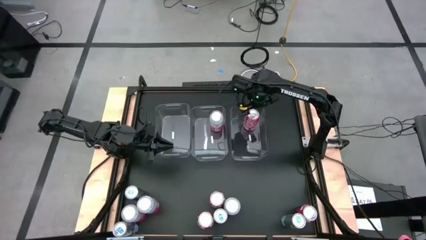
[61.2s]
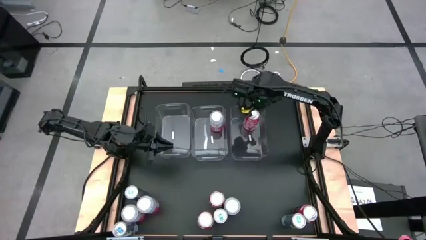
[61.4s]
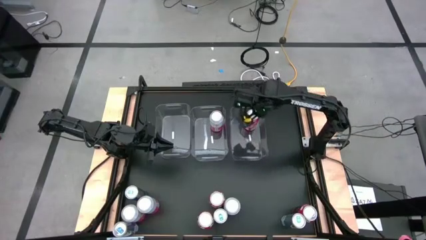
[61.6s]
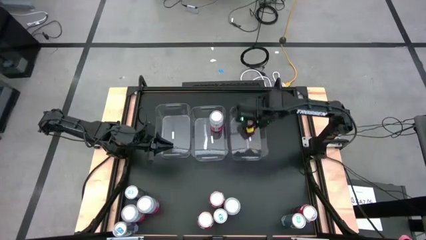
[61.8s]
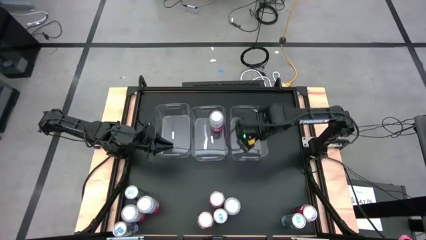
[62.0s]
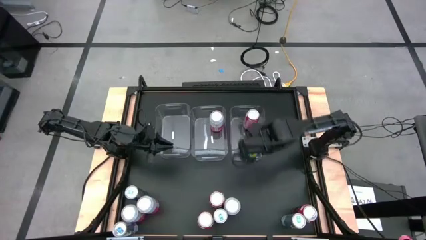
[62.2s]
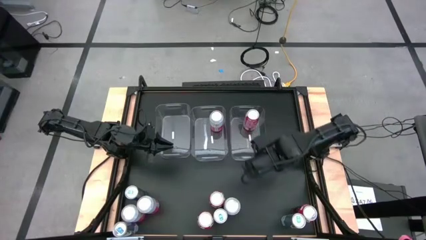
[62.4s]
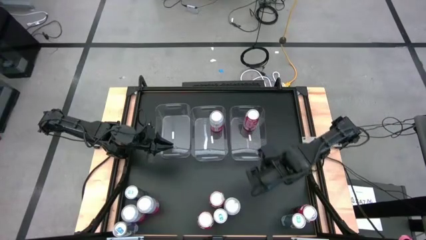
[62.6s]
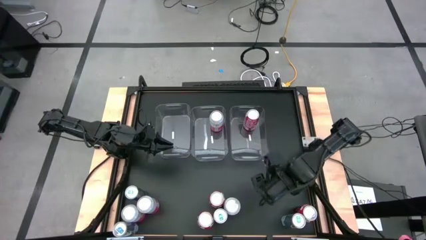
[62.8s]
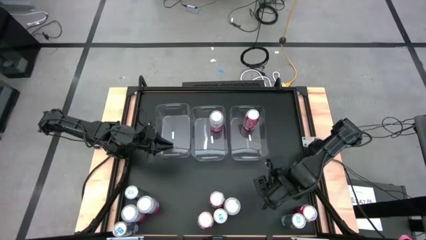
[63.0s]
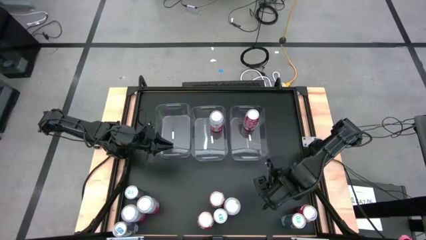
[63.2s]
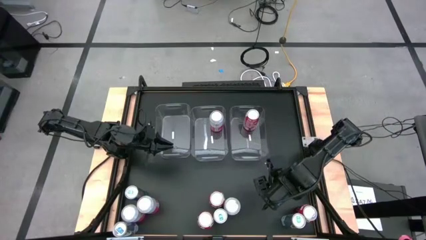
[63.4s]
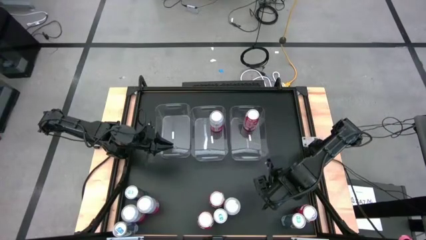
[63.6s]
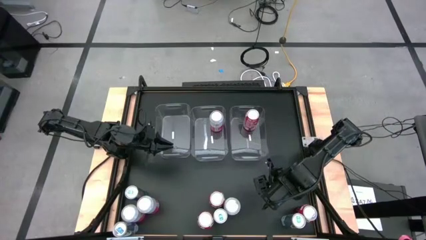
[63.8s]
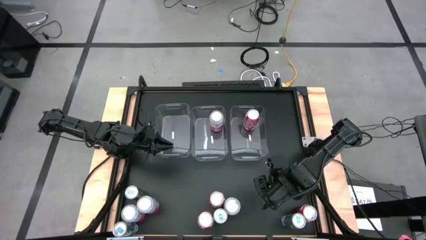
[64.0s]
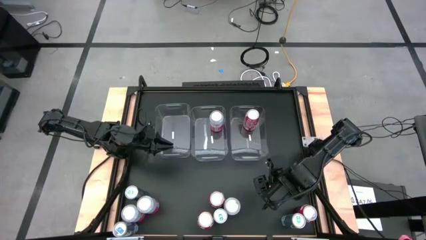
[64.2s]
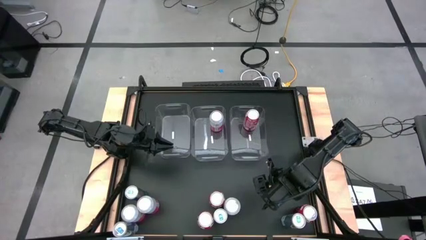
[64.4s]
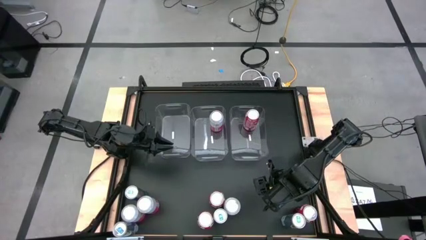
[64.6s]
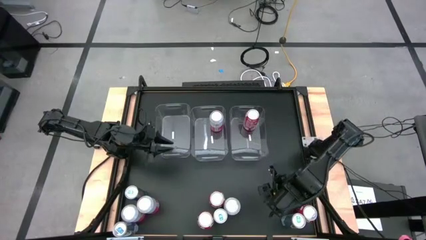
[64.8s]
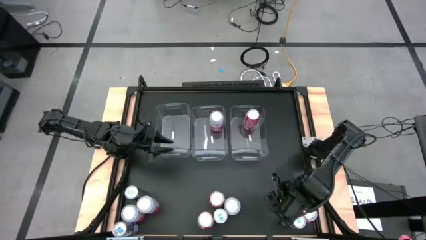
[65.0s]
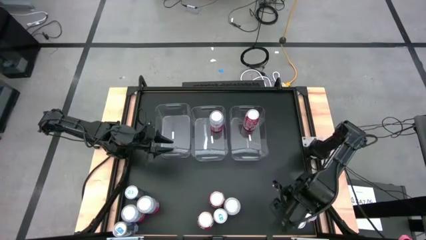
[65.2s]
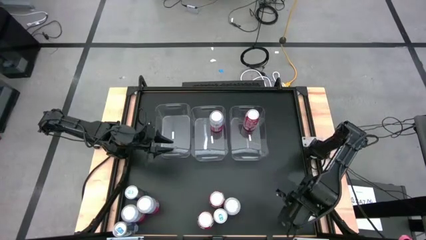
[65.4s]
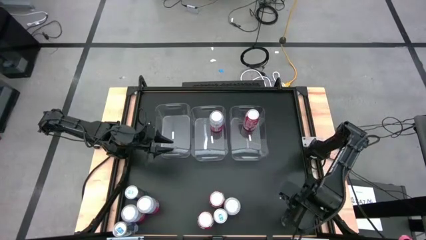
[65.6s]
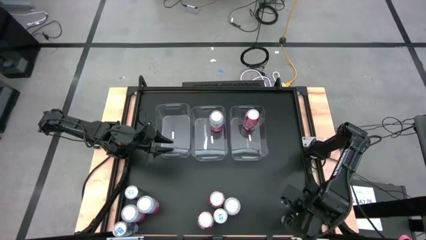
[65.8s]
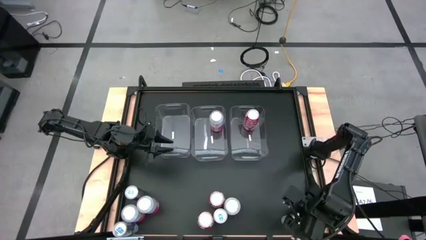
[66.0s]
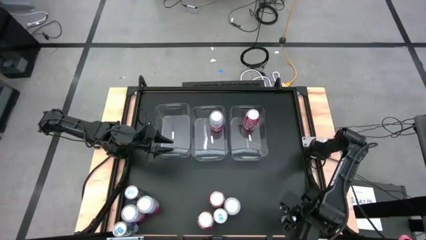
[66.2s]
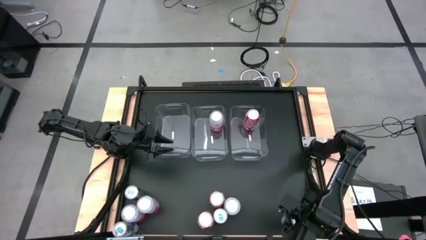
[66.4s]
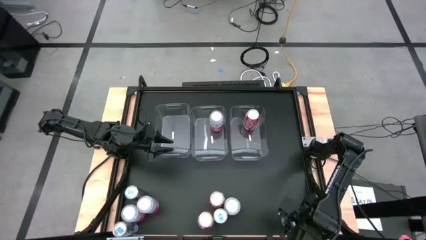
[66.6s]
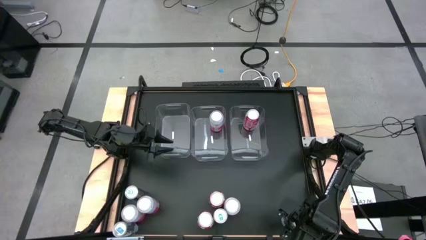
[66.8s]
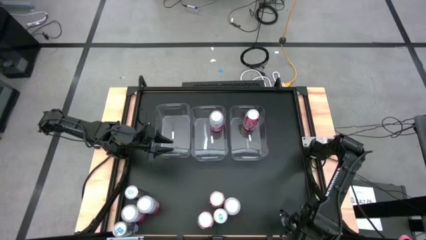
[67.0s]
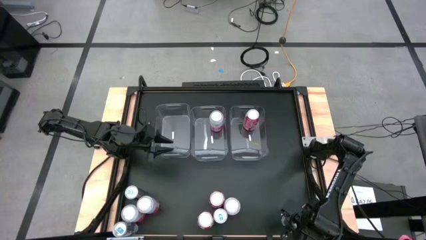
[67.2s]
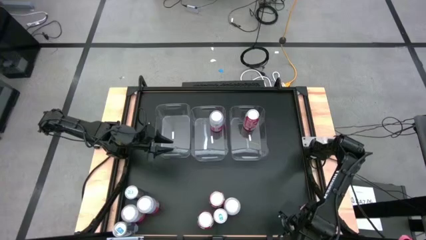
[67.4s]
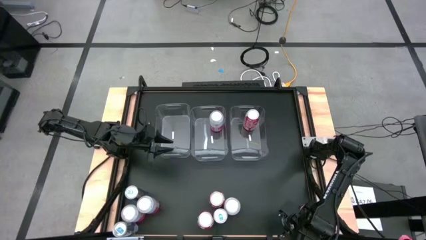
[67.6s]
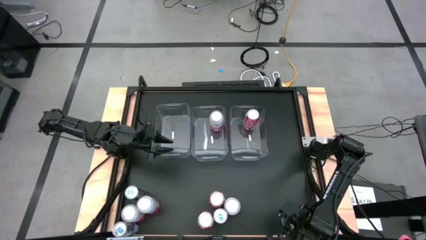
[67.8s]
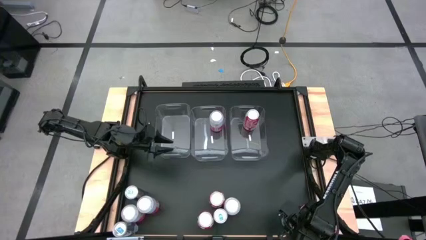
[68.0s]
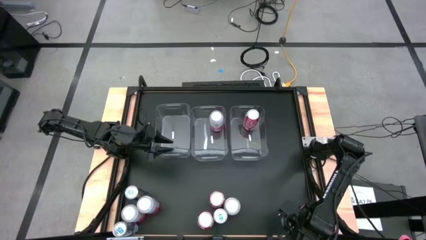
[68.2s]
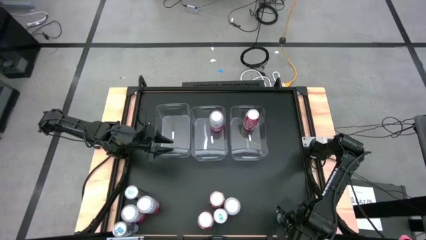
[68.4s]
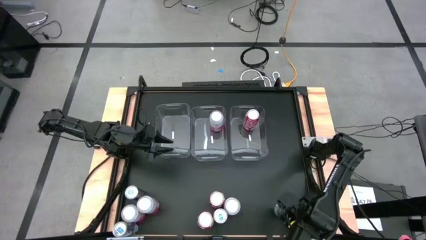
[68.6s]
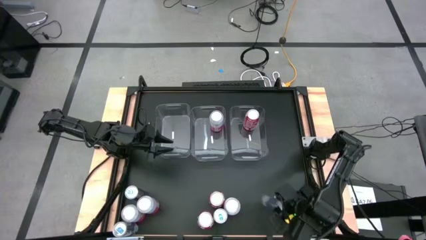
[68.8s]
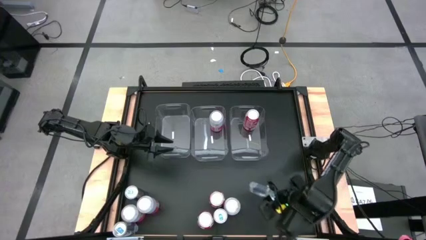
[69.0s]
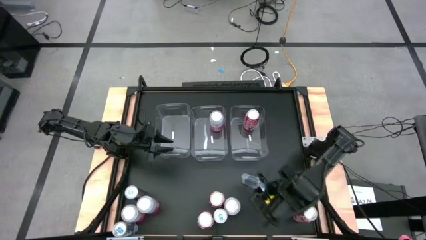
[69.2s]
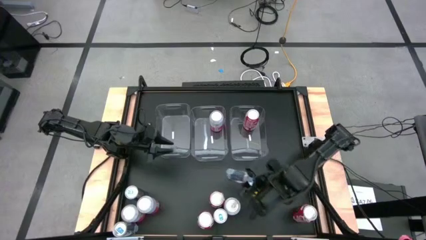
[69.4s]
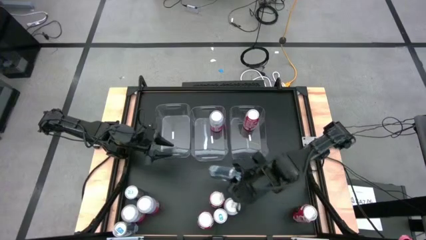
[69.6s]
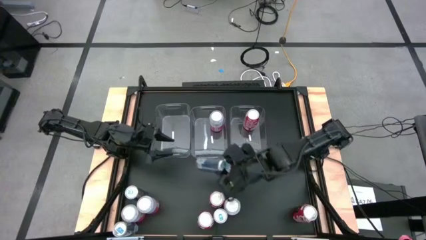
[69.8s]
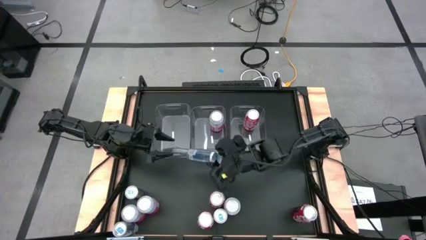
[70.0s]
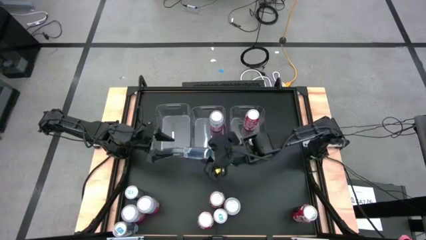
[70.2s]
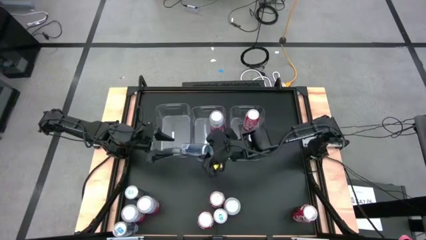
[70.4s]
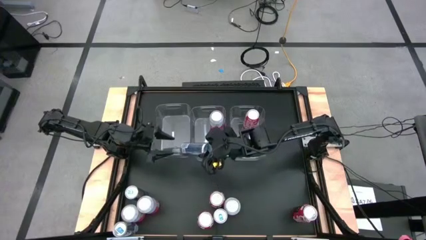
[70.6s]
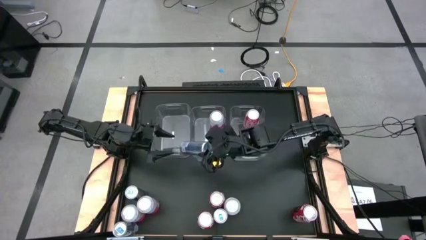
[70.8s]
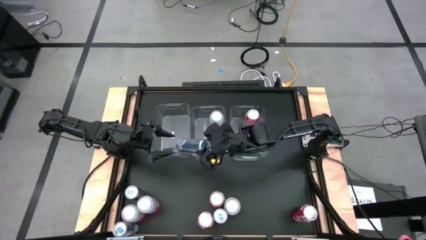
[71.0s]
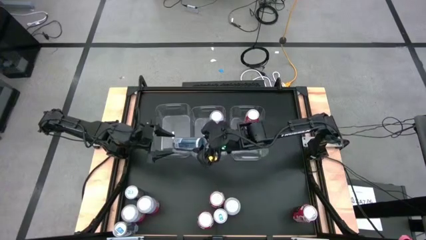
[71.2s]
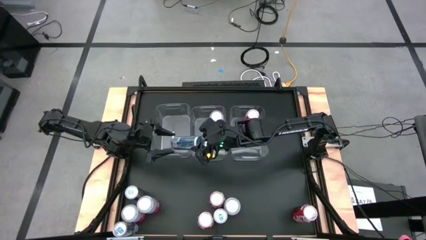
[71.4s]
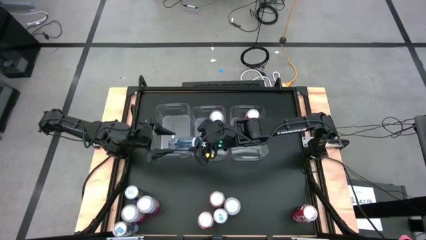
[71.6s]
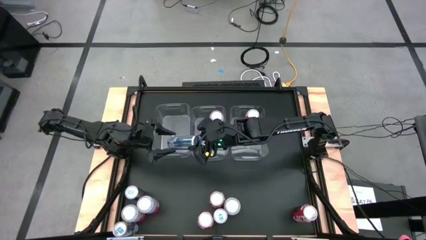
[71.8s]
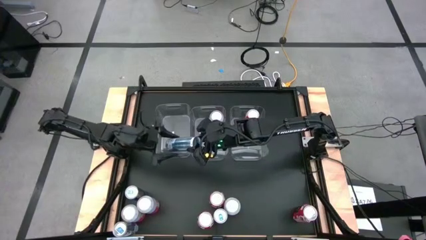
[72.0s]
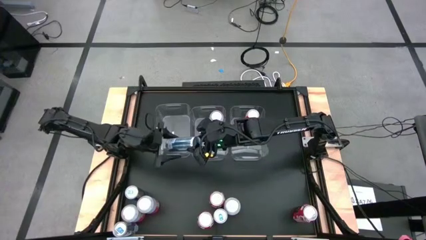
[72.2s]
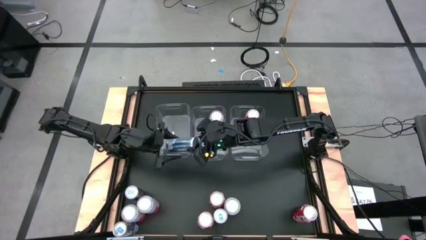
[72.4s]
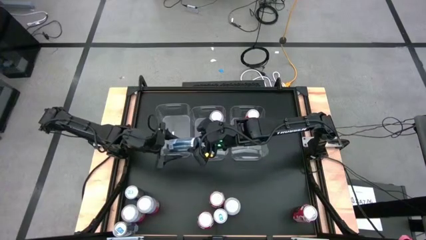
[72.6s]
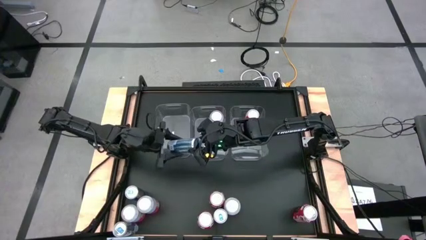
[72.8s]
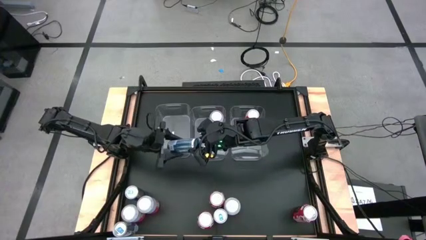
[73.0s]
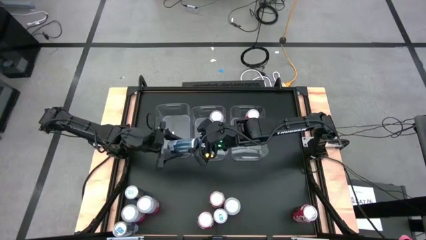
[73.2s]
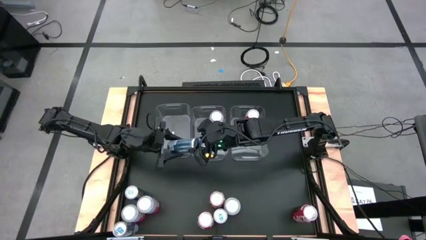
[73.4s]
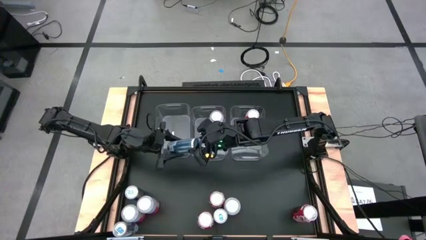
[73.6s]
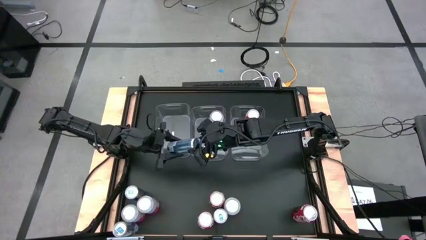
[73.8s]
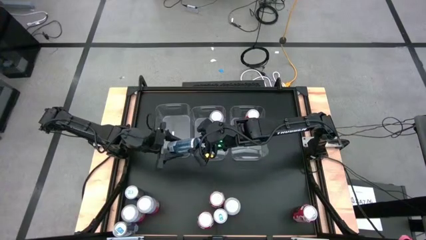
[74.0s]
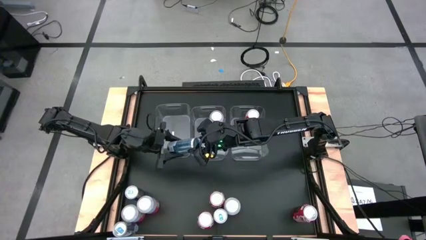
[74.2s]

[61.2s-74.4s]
Task: Sort soda cans
Put the blue soda can into the left transparent bin

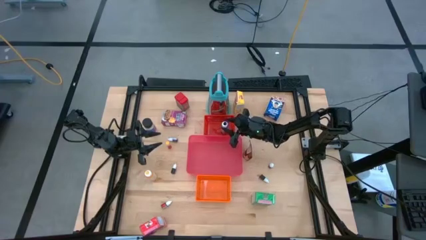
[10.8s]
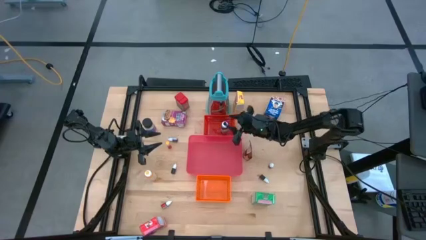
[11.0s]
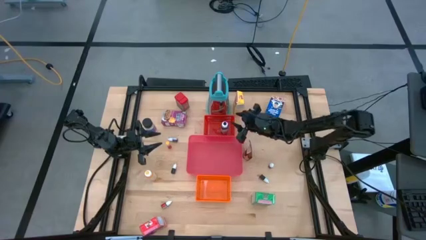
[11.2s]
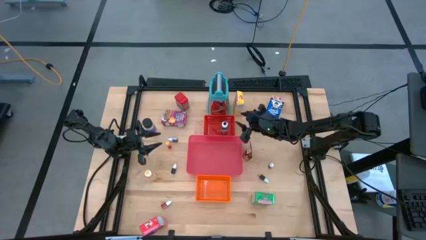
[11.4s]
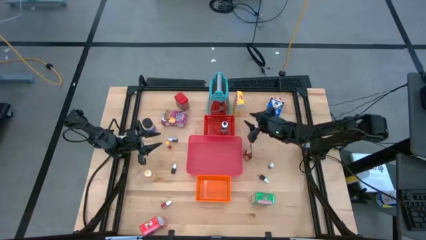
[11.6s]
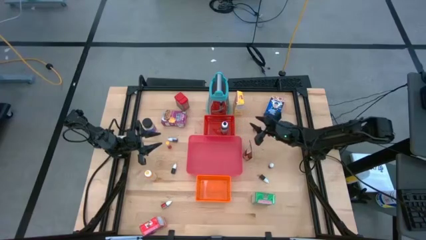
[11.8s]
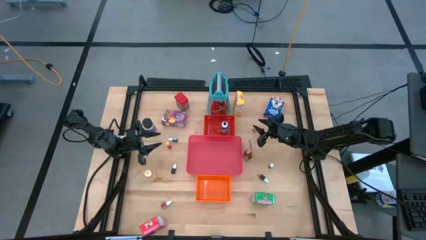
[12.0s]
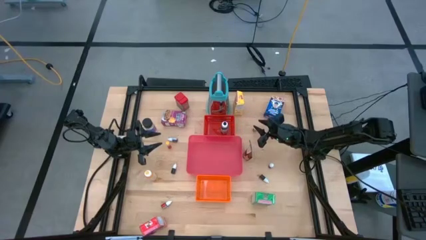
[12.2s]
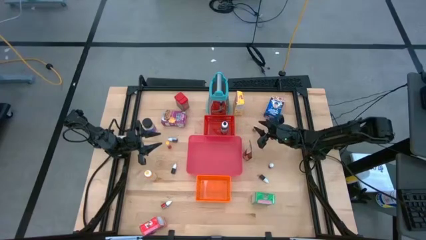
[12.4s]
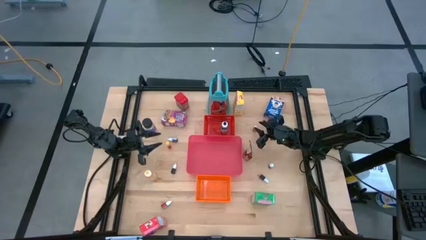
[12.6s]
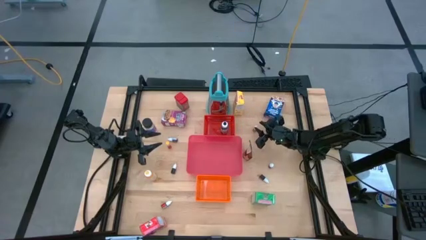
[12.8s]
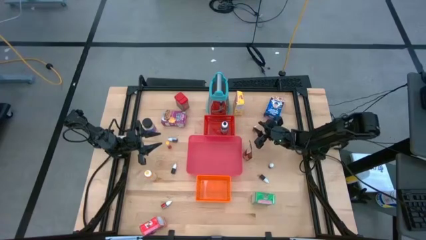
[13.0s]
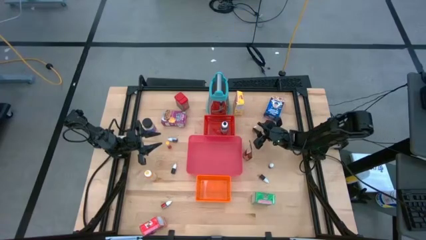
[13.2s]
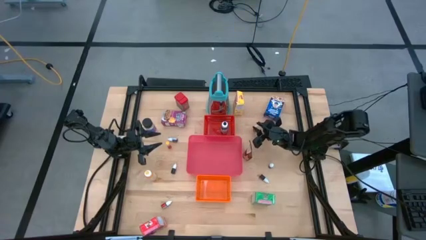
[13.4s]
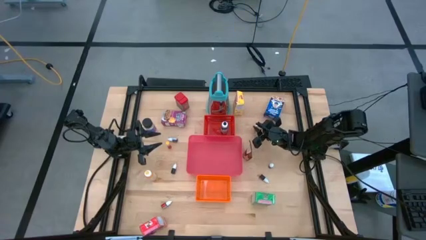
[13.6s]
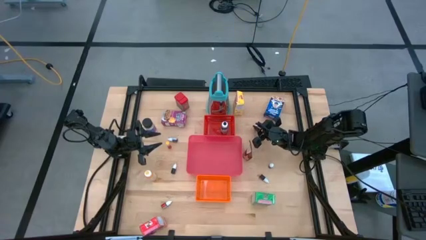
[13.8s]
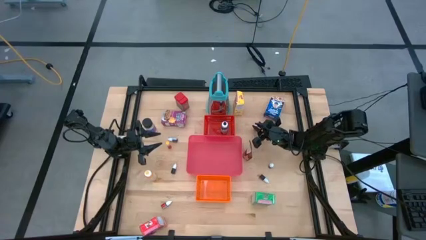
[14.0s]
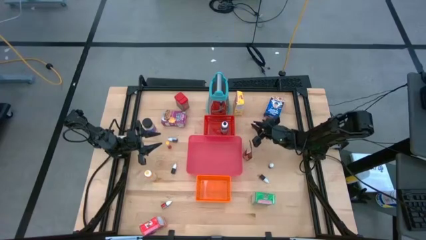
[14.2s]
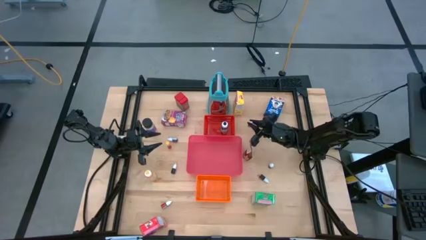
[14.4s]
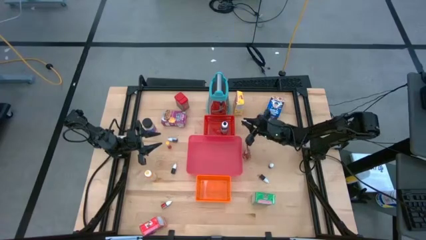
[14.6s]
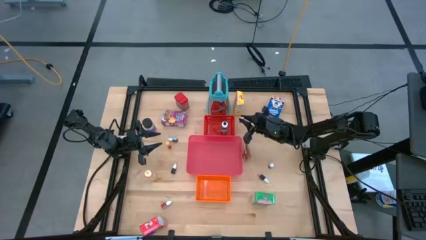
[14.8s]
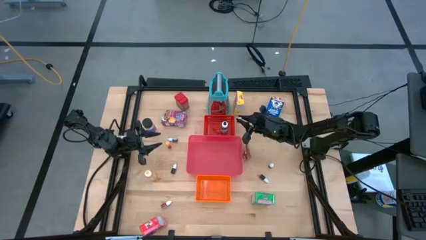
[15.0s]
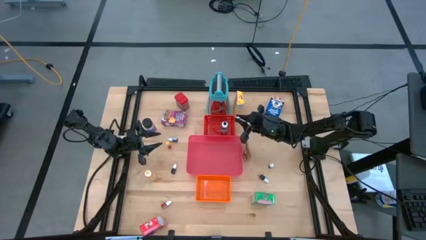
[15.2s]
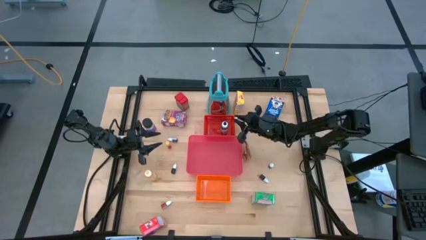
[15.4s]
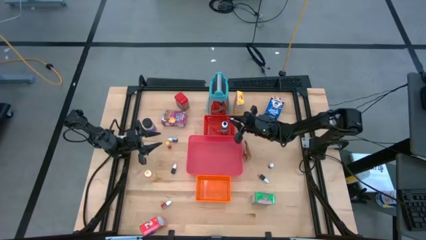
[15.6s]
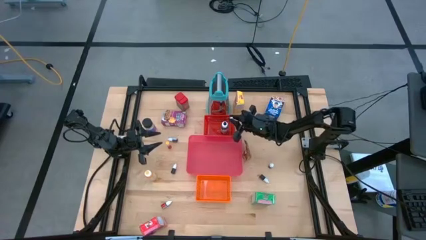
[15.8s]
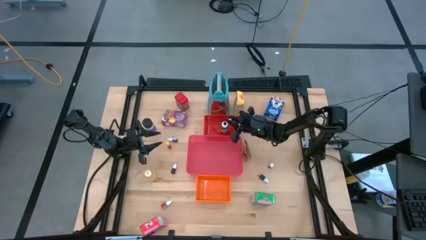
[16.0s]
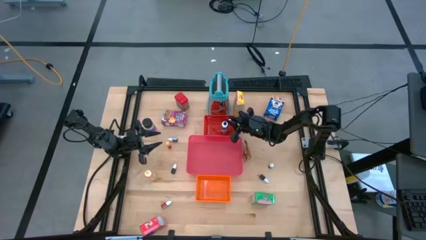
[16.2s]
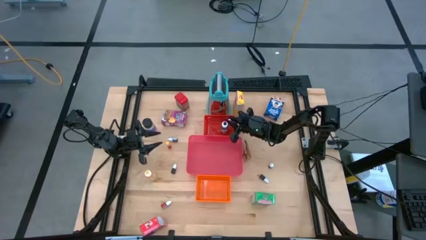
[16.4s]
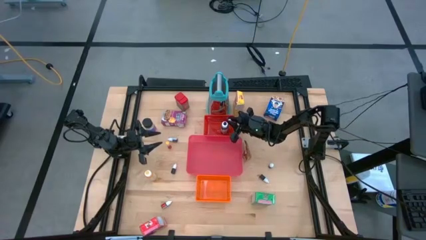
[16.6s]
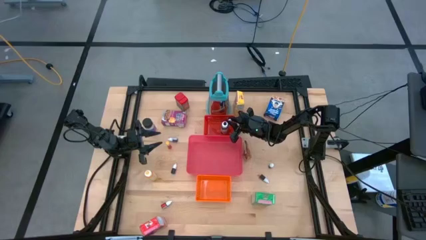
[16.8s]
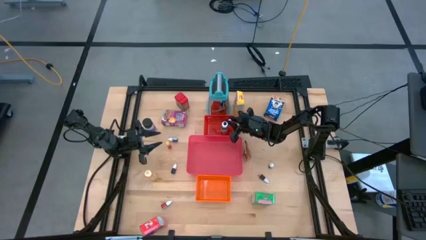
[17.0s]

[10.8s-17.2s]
Task: Pick & Place Kitchen Items
Put the small orange food coloring bottle into the red bin
